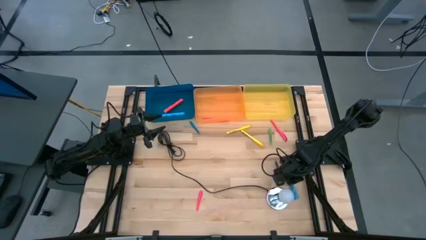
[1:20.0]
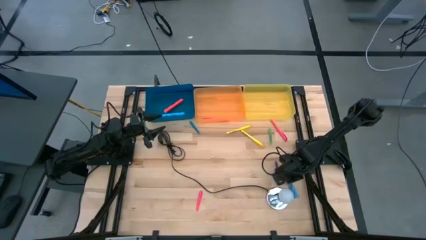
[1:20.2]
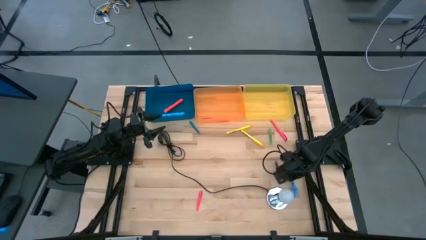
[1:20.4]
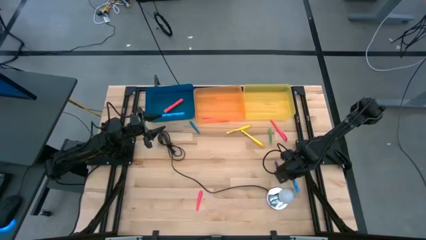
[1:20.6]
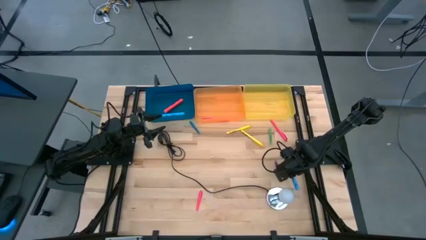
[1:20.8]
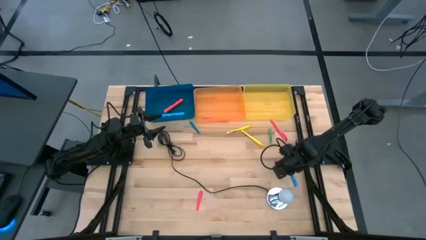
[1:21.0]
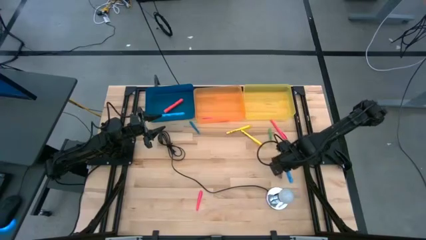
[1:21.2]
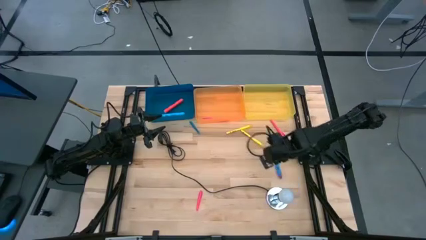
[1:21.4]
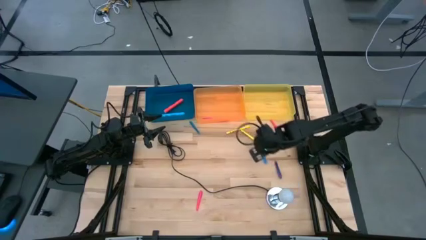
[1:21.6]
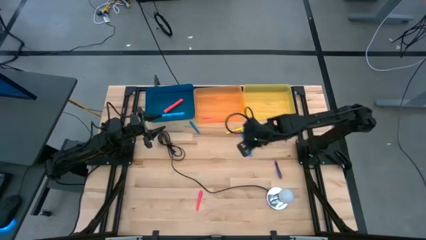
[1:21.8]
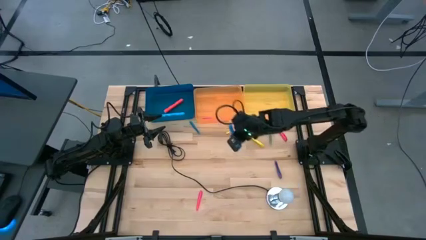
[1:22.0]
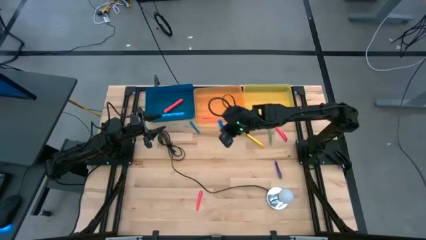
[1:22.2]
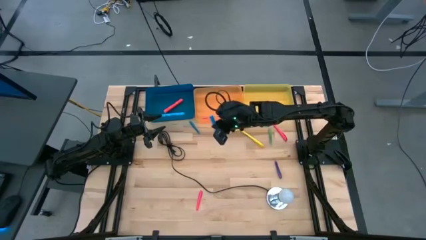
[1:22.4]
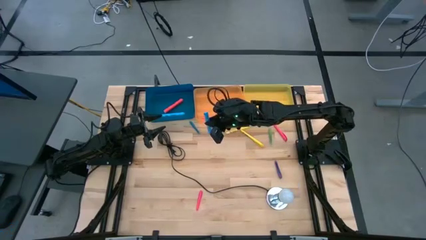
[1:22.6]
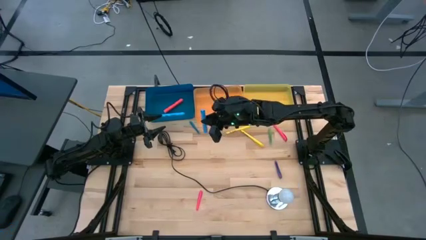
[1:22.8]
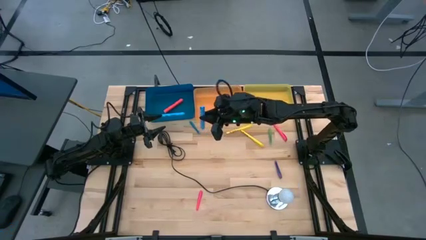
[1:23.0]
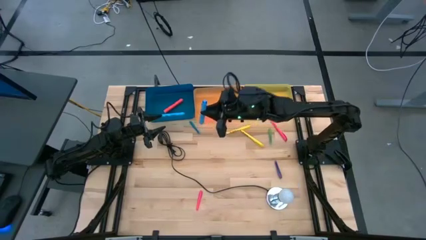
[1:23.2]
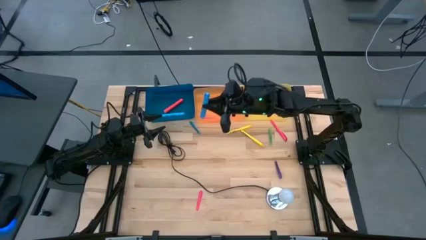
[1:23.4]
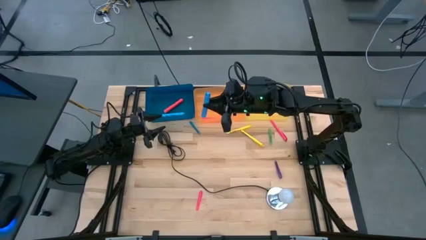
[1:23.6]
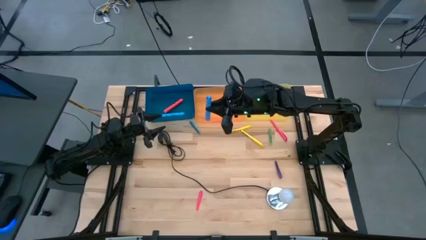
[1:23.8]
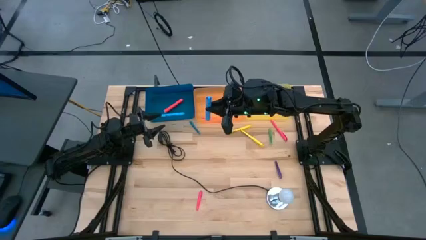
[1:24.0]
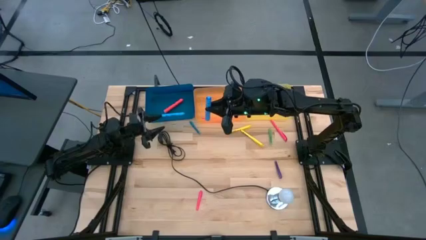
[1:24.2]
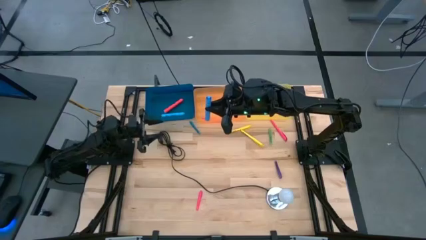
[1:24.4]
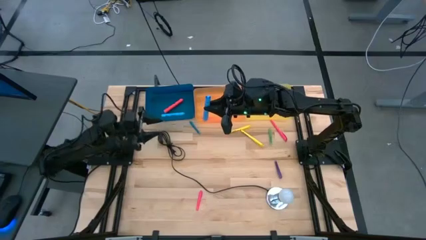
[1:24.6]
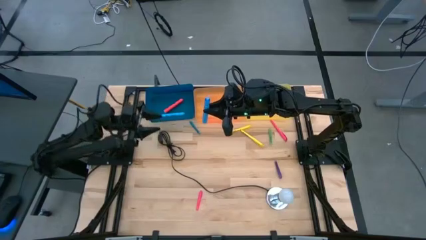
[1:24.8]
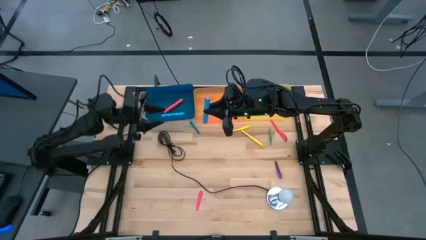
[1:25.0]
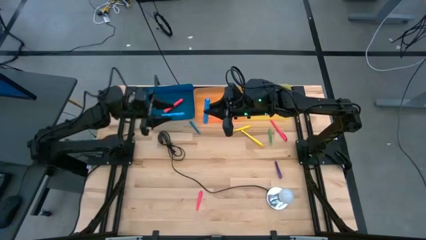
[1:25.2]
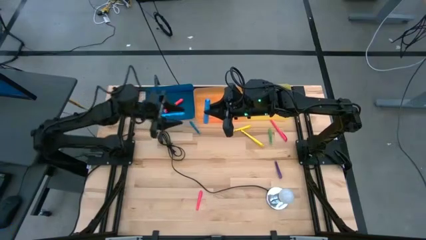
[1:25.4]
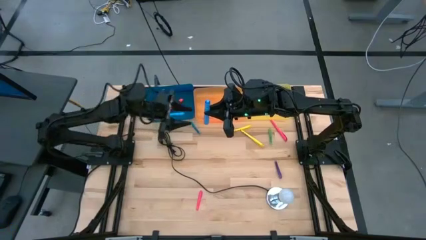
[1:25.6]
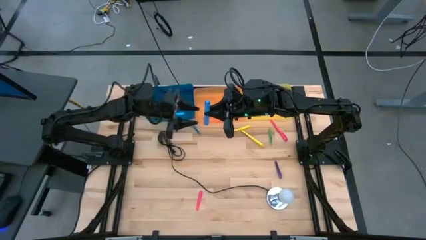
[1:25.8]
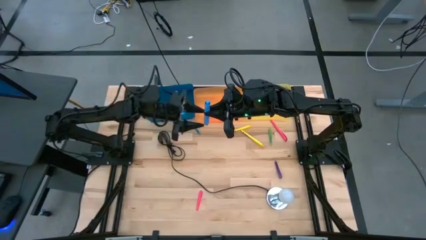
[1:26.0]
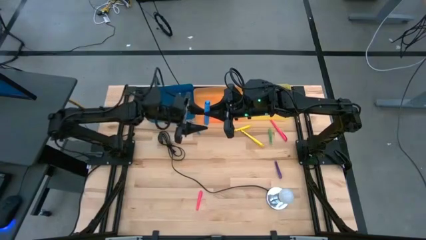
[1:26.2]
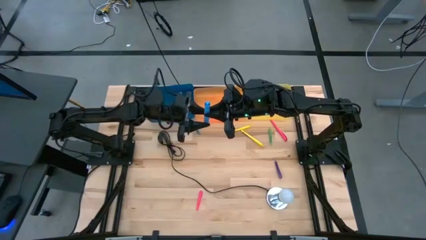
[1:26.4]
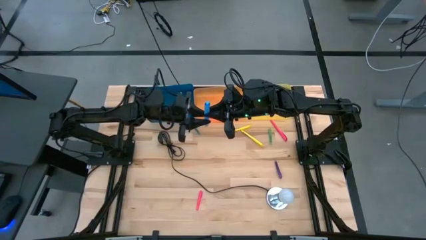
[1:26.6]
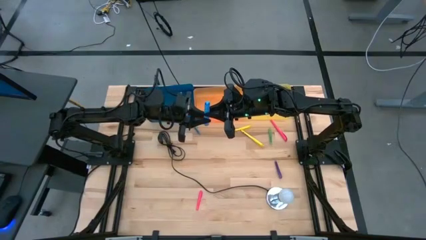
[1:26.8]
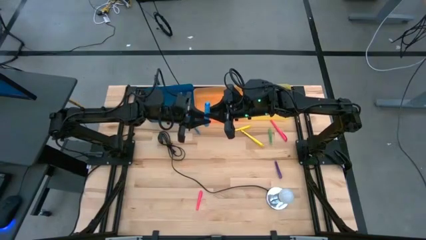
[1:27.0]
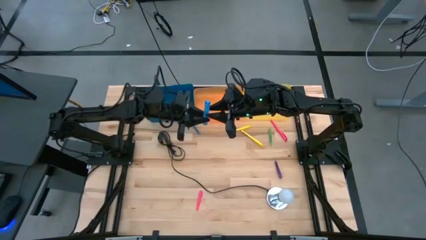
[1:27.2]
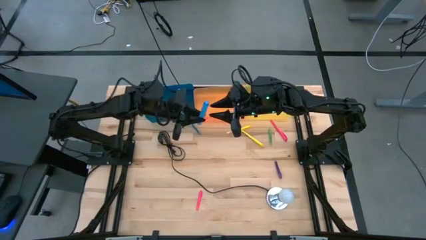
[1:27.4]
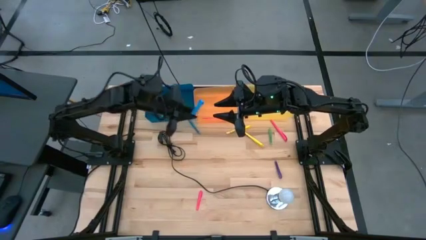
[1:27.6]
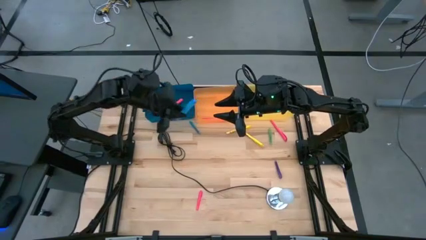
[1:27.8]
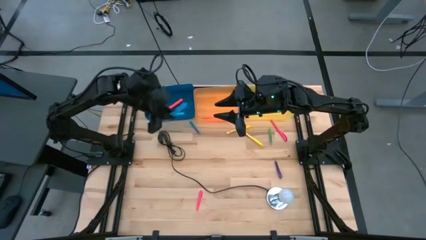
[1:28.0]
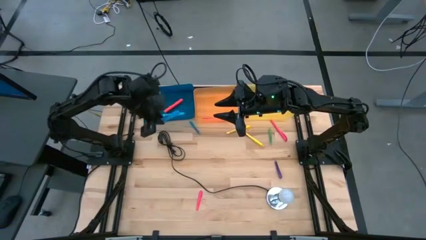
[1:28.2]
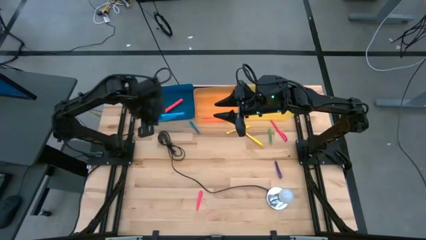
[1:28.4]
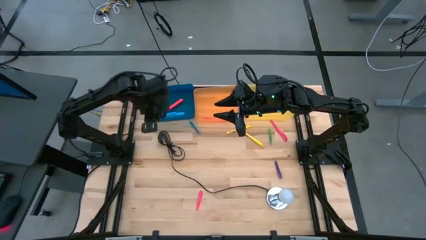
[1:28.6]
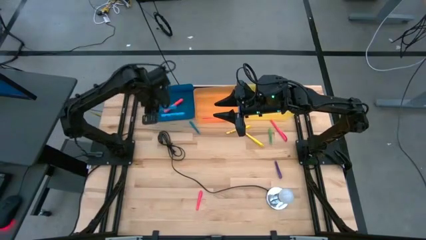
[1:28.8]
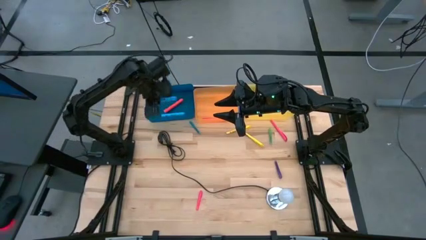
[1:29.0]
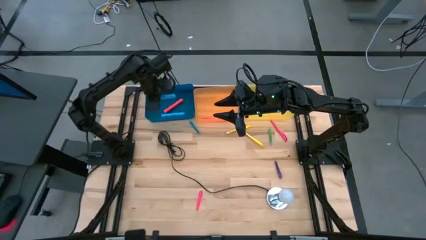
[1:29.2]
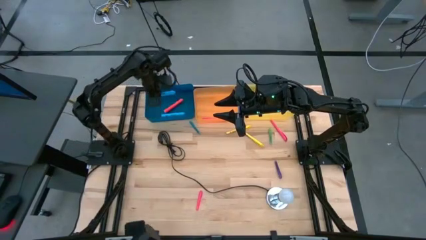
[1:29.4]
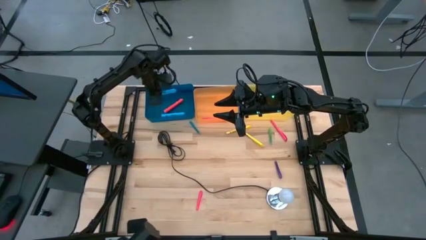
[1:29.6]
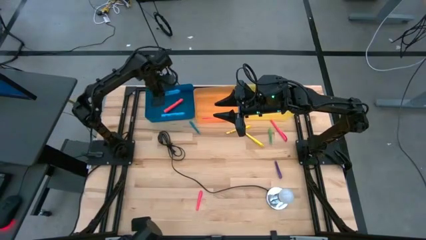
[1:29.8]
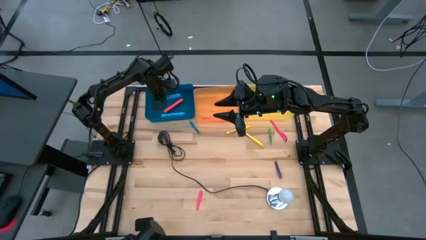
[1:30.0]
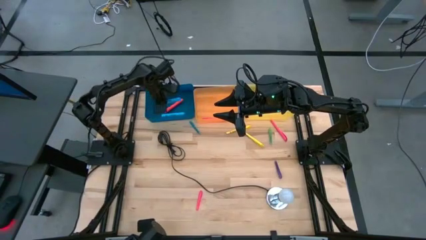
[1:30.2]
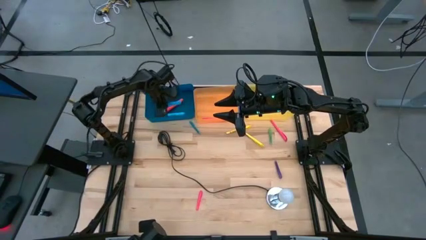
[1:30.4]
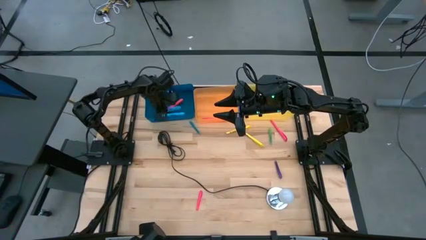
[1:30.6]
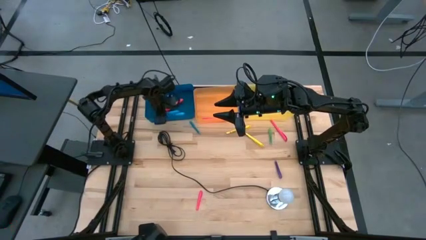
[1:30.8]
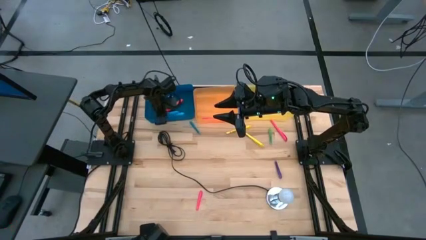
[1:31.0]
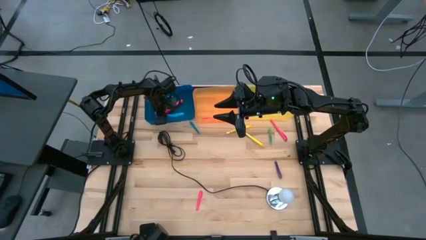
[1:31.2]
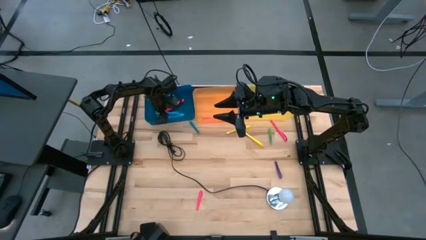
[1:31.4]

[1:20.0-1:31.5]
Task: Pick & Place Markers
Put the blue highlighter pen into the blue bin

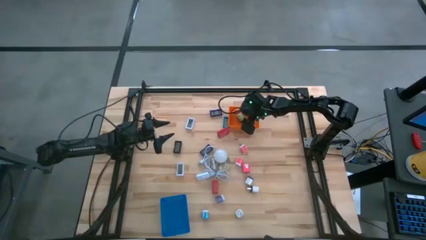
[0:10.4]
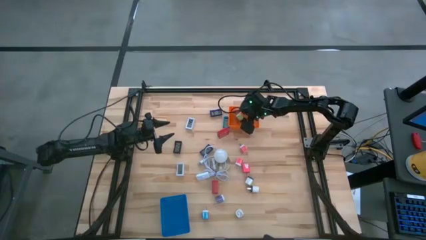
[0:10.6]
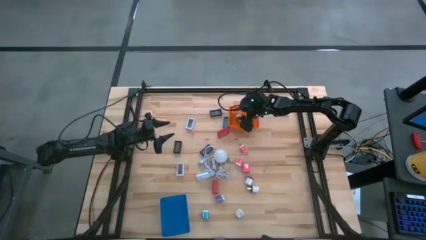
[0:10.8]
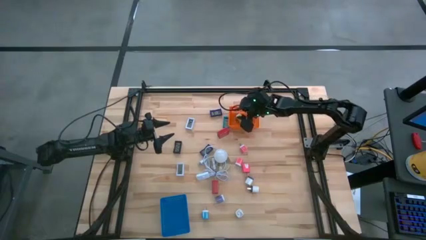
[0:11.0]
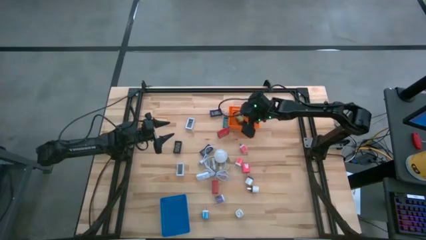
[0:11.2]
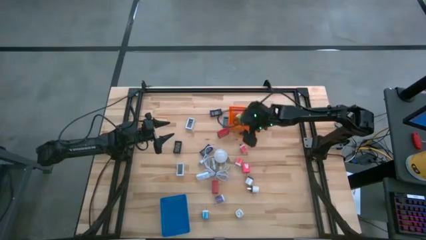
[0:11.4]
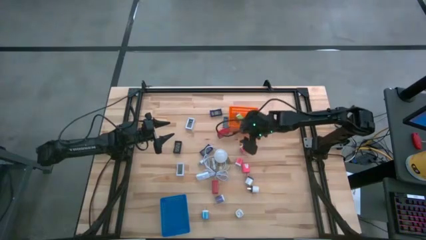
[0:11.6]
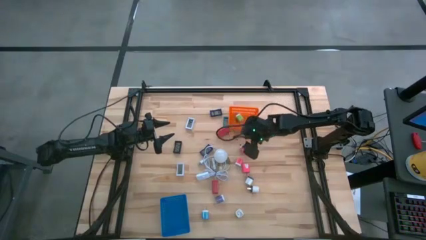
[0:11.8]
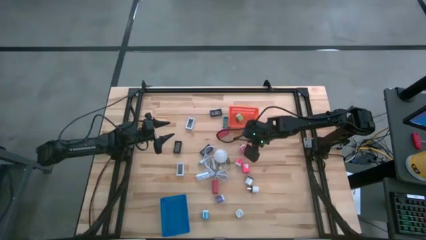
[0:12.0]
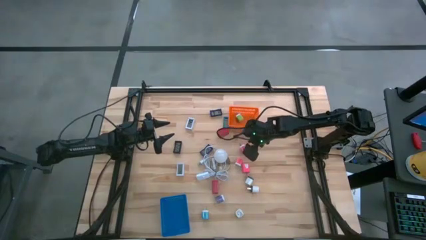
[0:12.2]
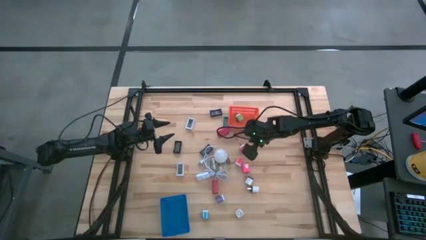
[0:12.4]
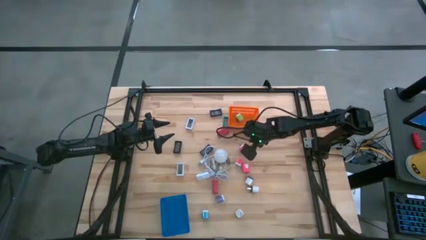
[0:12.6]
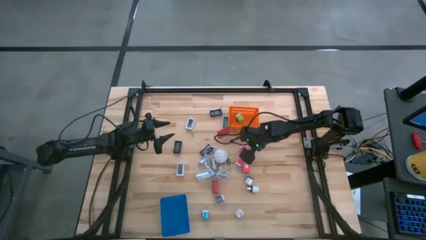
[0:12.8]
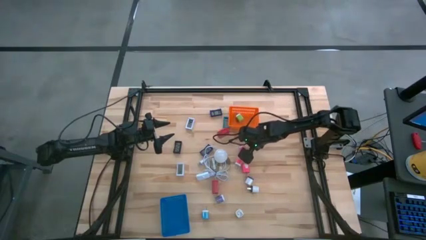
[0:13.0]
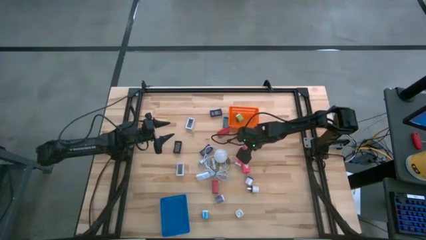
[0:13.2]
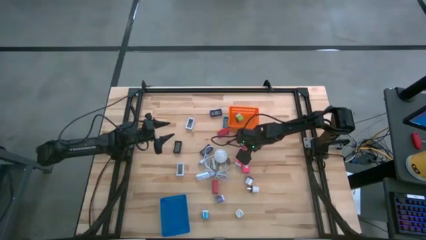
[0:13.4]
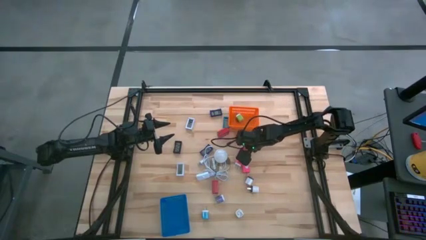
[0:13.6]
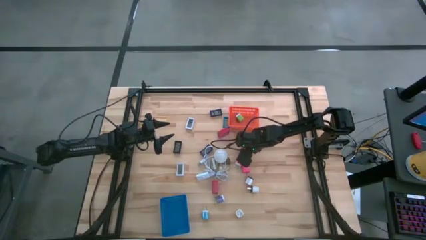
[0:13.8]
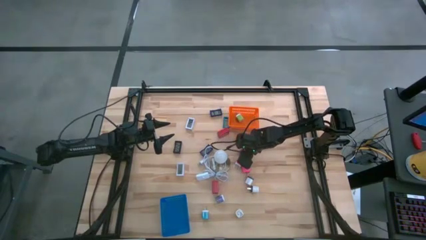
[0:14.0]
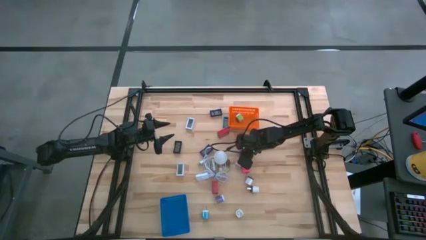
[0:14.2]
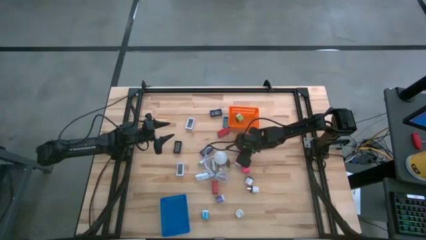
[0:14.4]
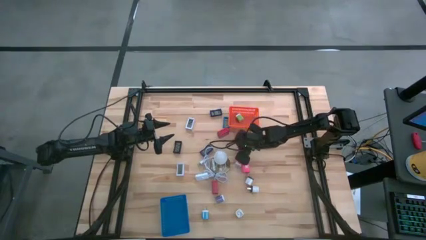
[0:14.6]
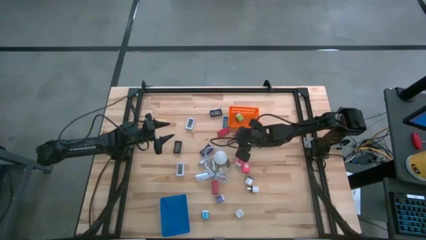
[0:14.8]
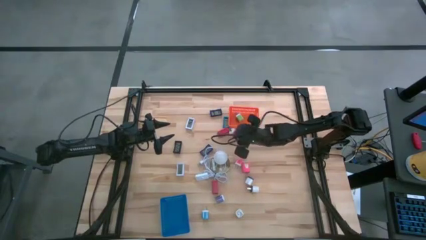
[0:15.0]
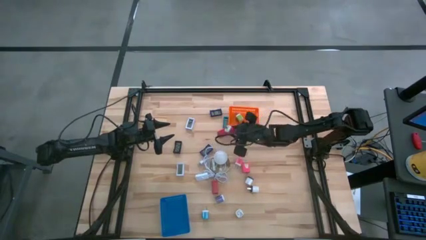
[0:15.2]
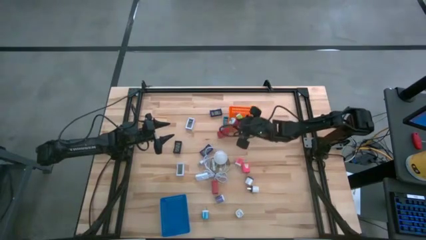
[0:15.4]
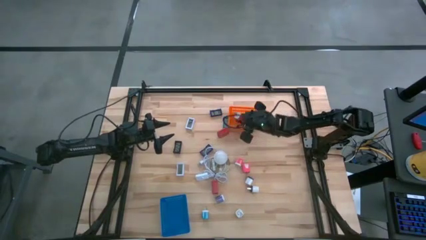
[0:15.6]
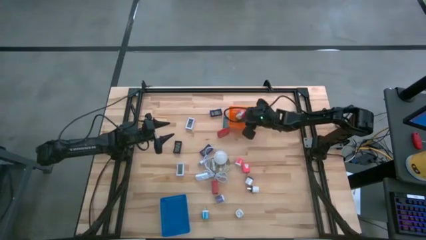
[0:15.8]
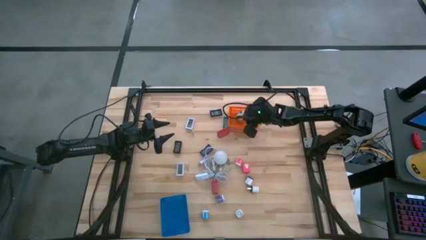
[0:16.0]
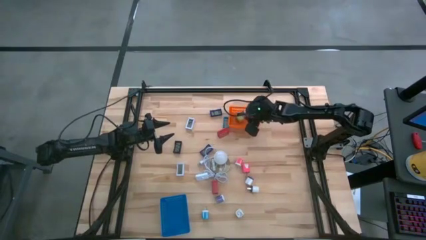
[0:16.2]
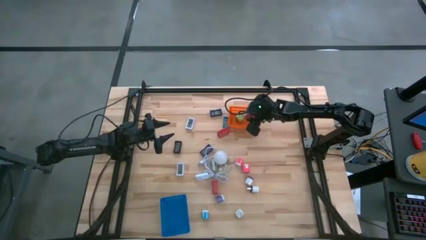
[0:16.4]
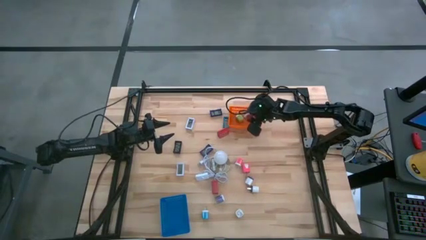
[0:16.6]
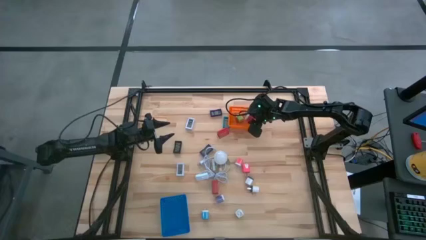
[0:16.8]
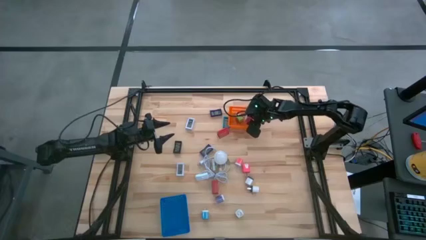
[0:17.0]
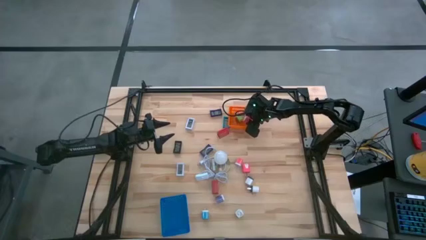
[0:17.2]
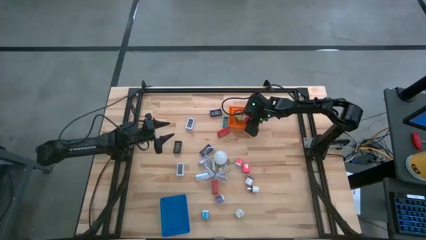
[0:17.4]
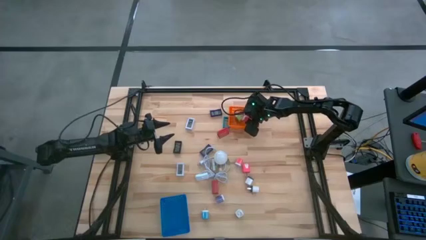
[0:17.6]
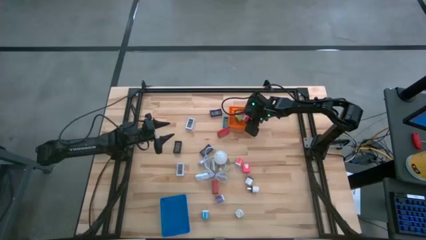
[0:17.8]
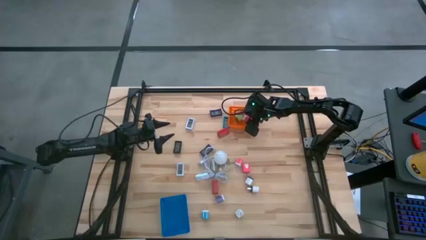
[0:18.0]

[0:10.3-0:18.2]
Task: Pick & Place Office items
Put the top pink charger adapter into the orange bin
